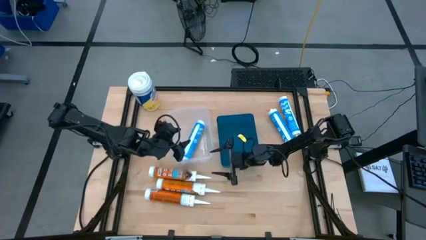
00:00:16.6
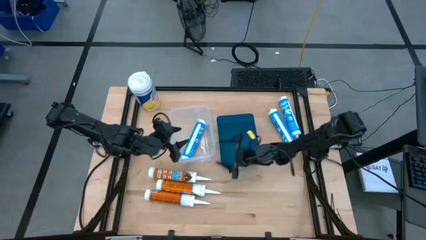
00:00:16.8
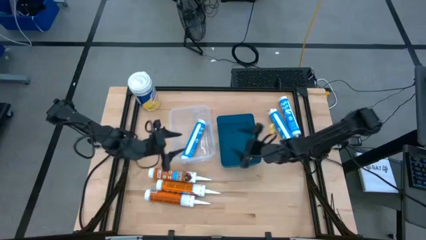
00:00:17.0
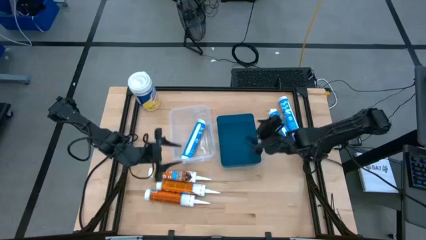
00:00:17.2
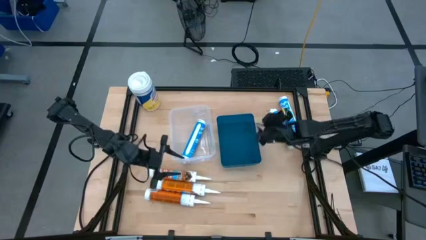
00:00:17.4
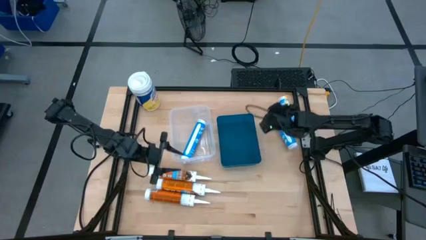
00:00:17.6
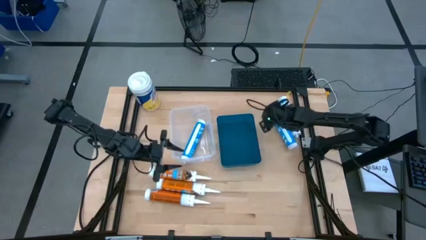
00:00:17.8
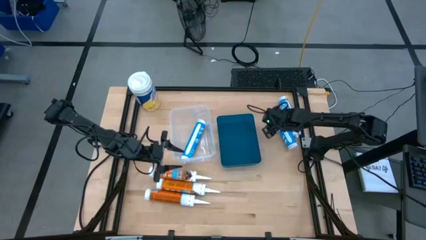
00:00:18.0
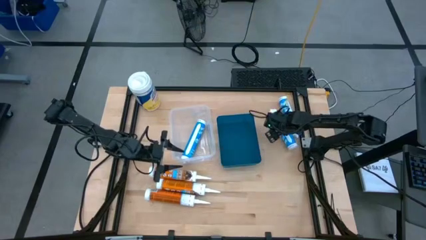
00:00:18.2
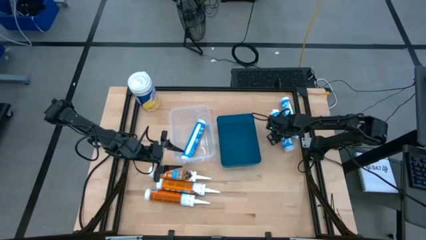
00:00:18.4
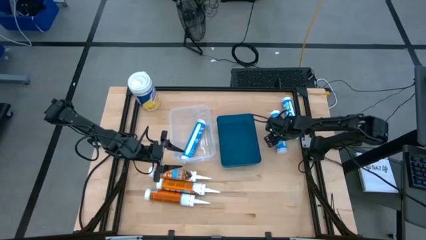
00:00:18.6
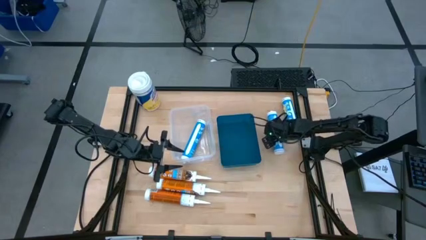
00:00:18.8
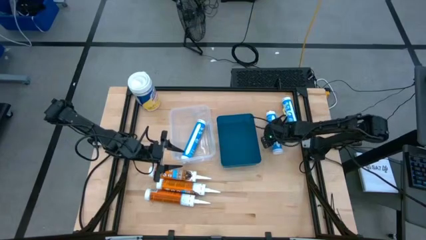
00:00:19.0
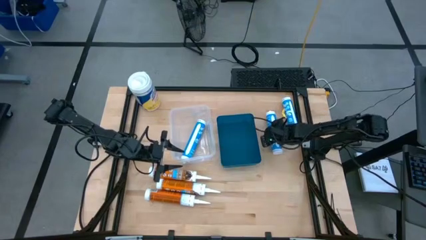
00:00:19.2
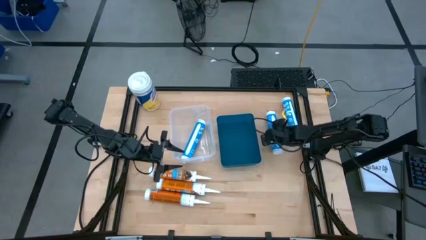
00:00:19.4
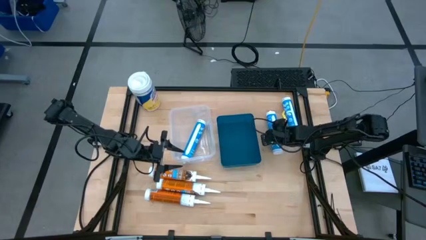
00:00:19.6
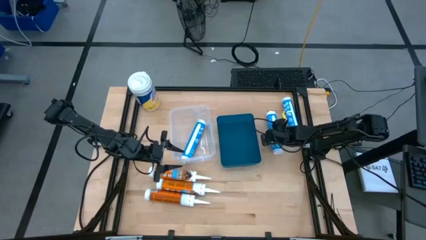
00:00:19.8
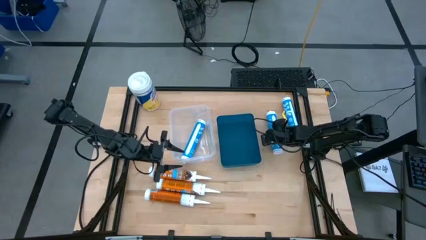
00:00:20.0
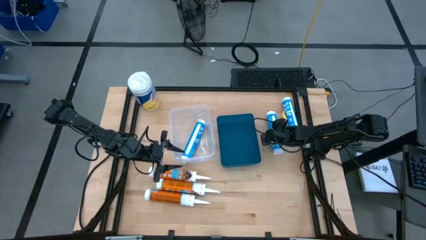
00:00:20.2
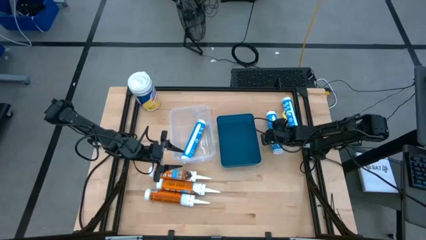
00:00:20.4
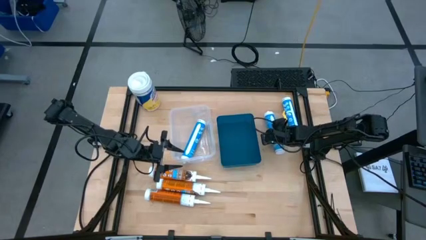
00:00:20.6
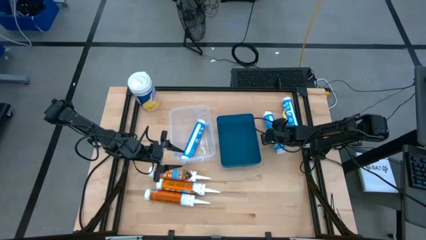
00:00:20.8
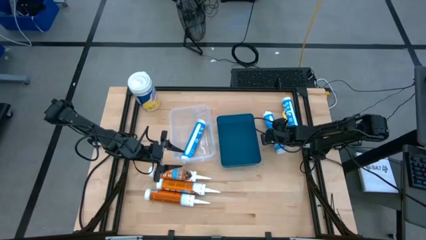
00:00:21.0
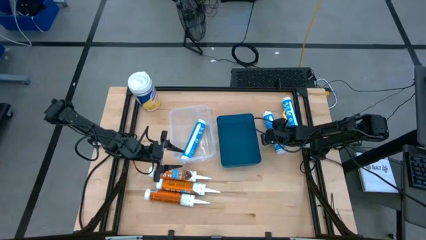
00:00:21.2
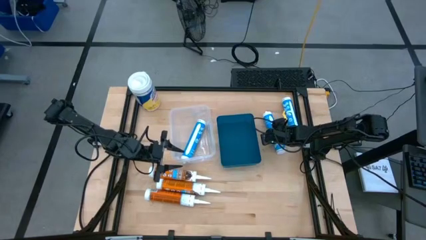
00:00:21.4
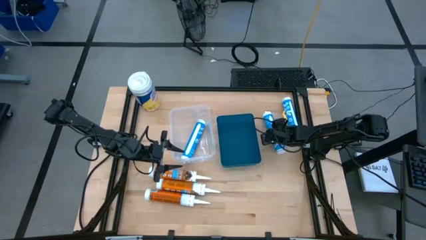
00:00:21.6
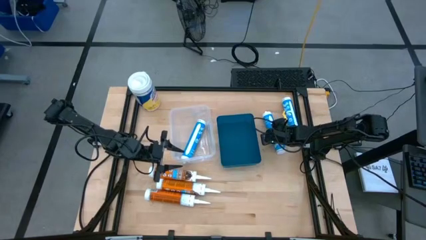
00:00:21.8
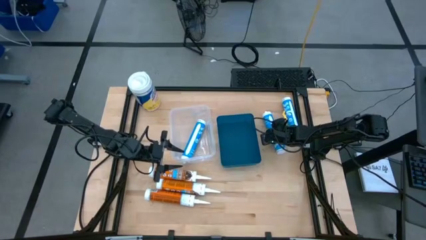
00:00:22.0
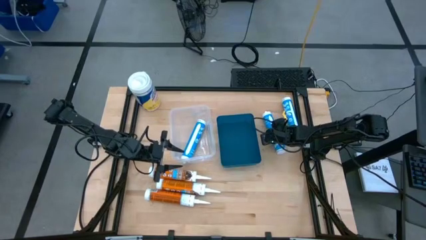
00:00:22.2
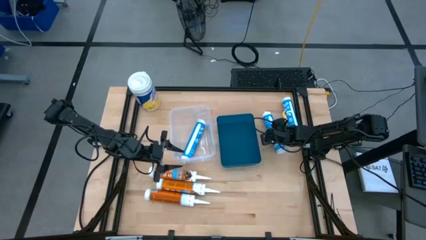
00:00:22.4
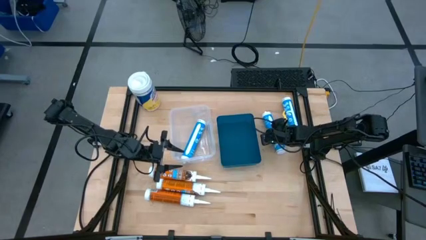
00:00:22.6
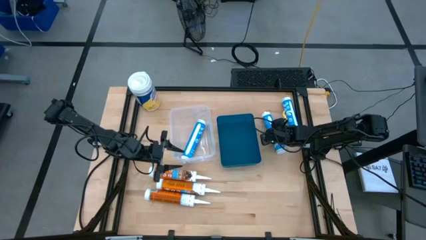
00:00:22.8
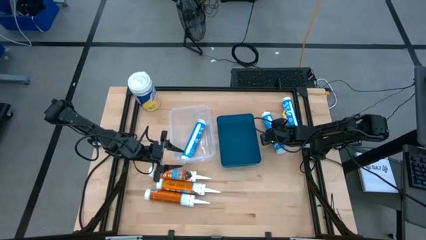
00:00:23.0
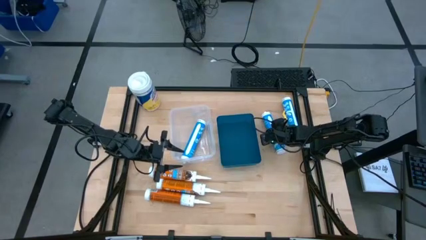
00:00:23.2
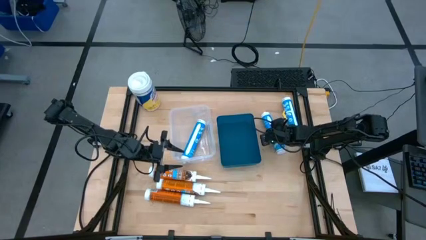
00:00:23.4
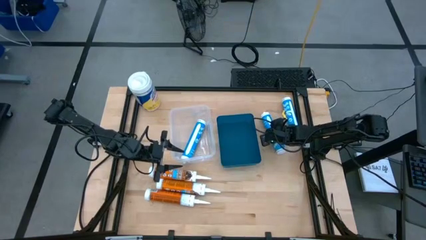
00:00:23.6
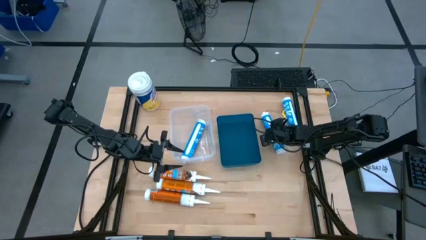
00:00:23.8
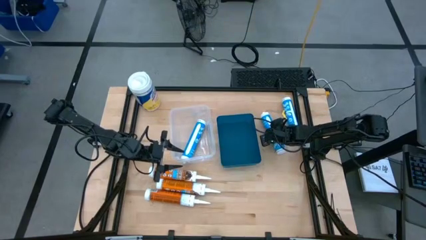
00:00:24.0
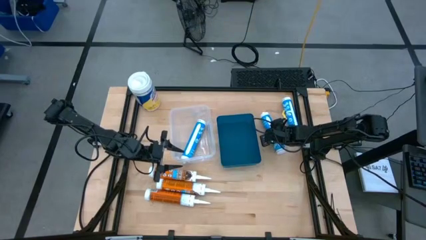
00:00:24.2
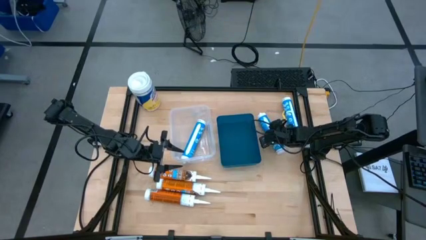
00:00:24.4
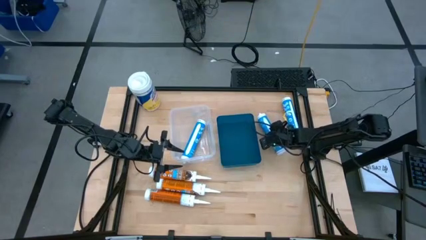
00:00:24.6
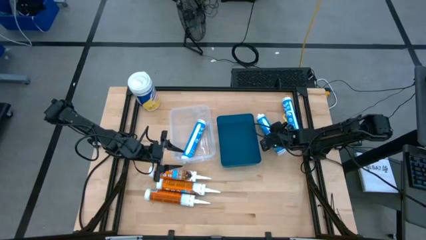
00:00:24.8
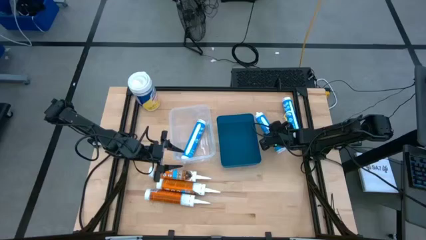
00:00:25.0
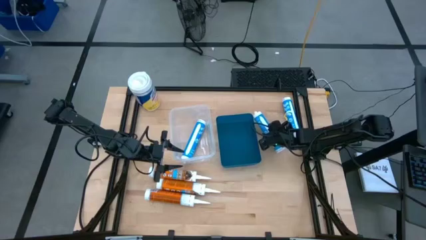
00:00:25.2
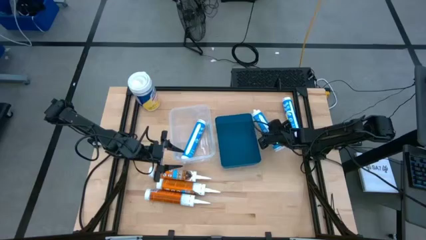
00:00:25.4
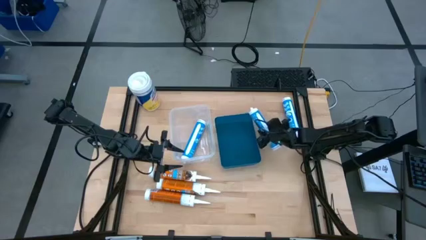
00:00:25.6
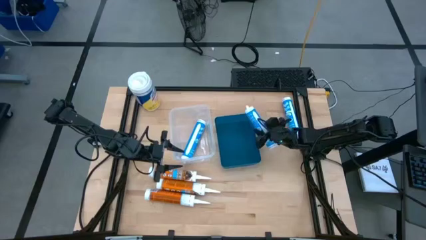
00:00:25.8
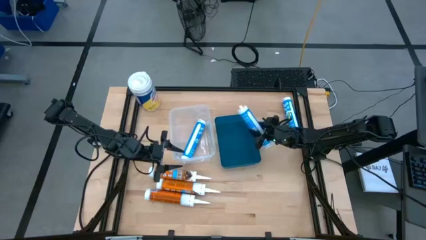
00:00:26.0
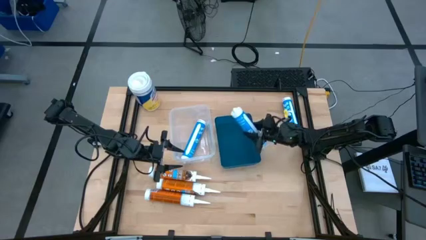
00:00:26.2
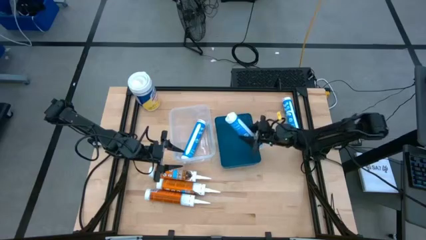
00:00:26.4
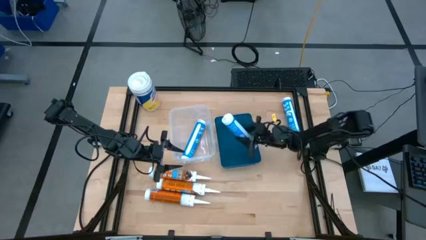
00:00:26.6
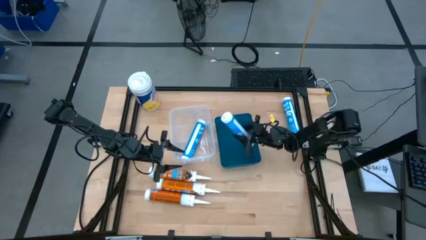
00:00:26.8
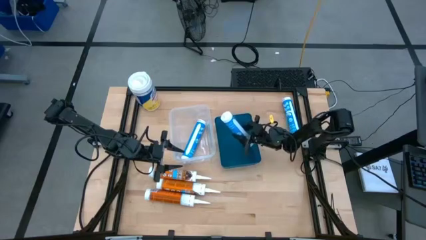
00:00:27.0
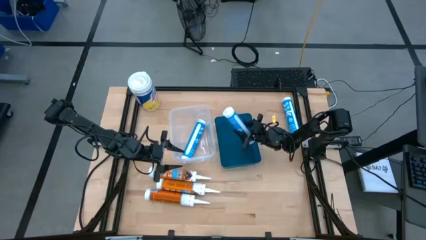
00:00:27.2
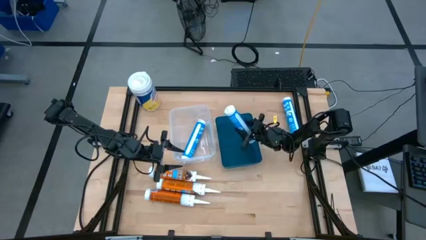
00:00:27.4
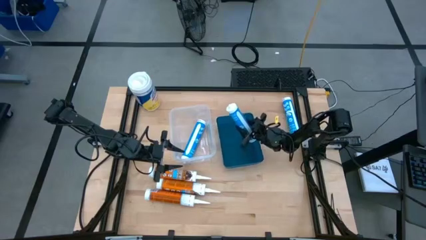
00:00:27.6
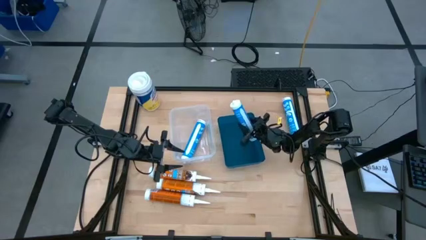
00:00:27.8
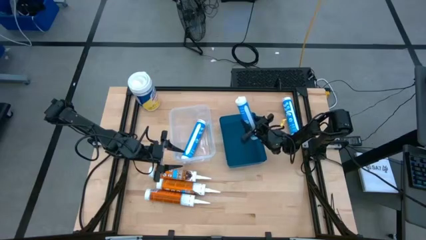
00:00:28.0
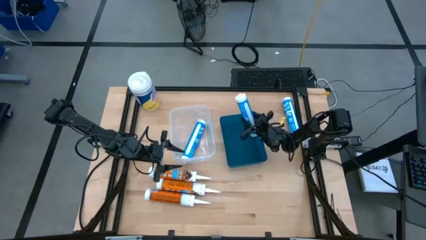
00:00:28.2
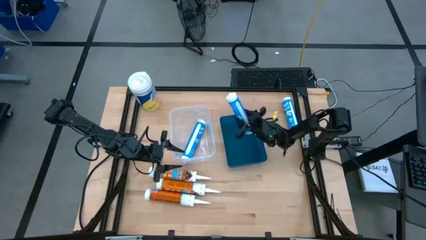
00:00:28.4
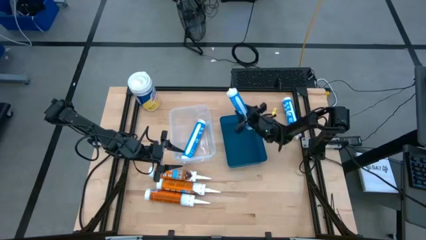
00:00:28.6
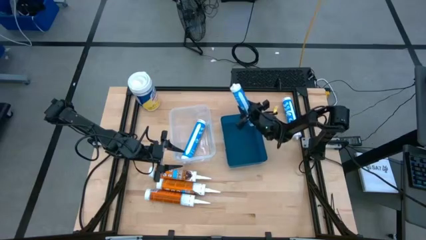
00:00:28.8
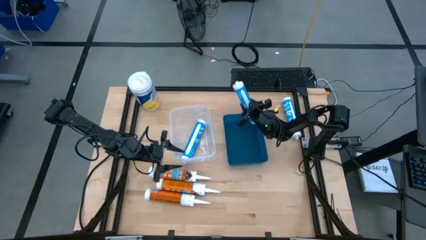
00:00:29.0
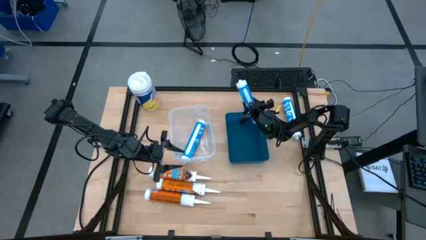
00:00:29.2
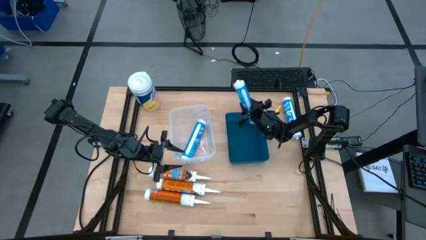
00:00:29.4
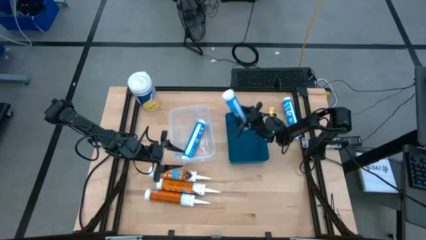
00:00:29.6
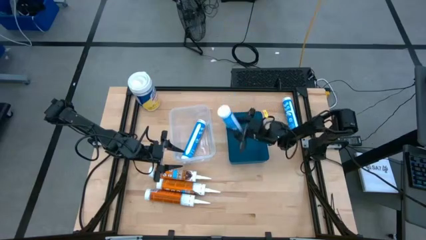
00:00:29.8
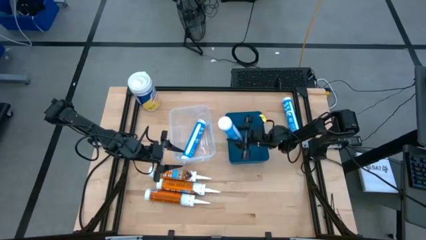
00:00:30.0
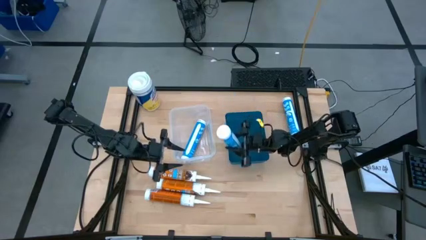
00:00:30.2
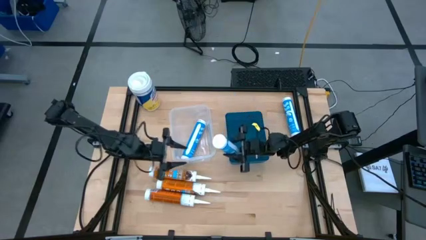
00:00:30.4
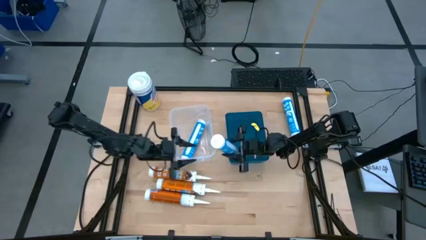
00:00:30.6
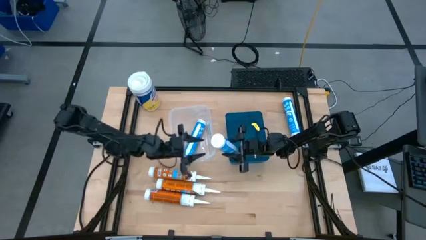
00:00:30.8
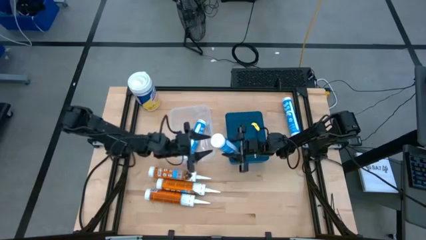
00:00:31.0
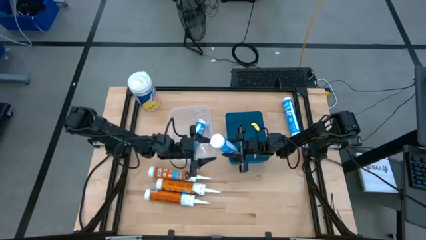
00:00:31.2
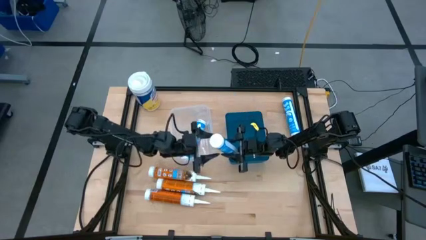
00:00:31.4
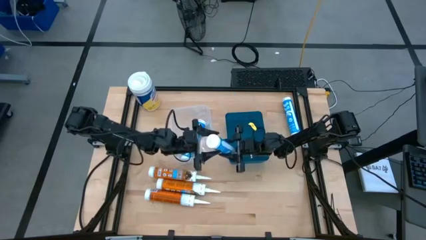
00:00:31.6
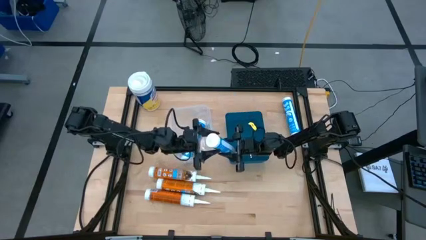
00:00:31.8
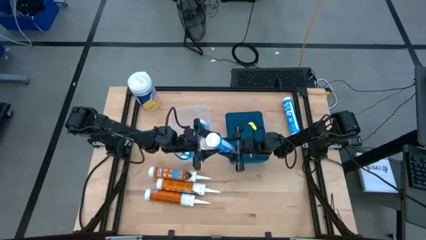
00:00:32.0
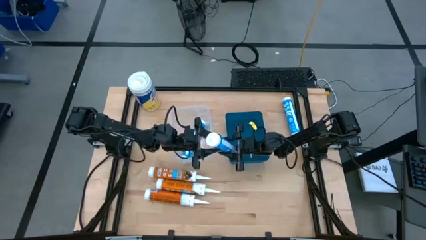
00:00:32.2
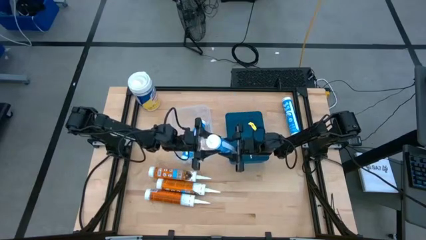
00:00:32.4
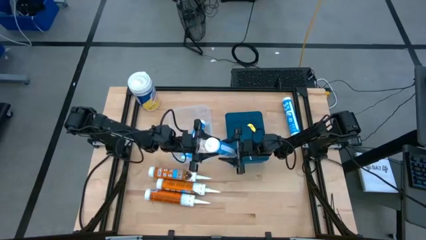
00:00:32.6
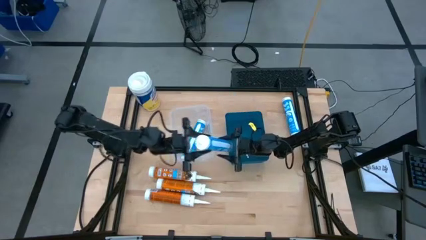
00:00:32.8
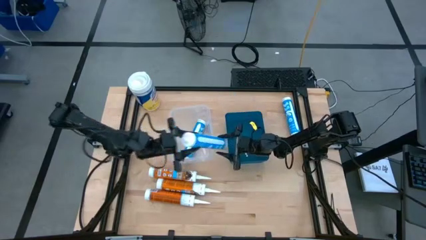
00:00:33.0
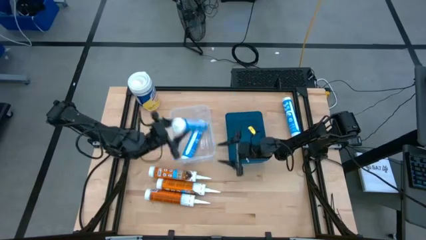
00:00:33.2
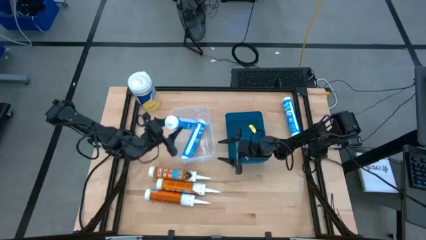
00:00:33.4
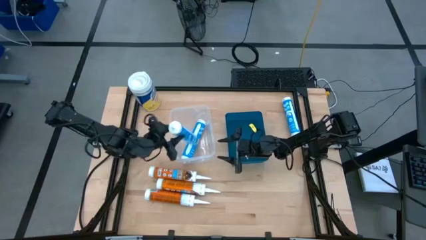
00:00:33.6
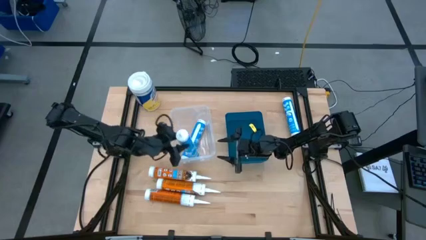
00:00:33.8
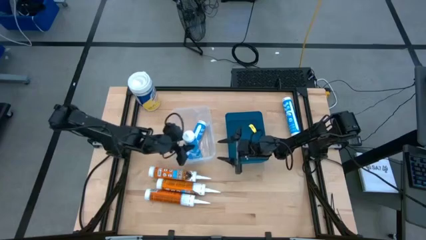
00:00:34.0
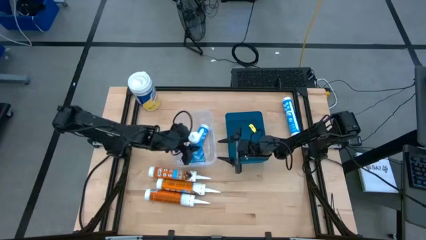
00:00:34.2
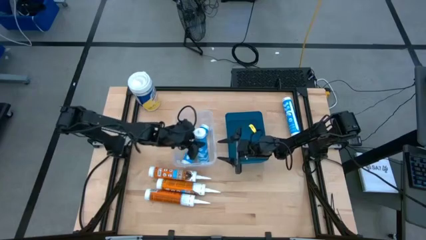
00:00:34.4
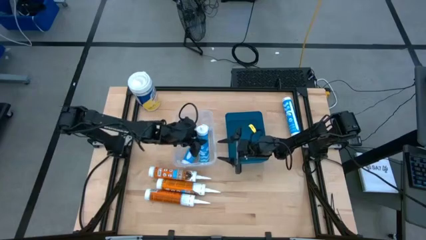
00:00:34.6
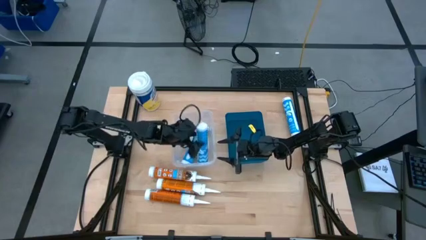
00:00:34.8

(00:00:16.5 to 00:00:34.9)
Task: Pick & place silicon tubes, Sealant and Lysol wipes
Put the left blue sealant into the transparent bin
